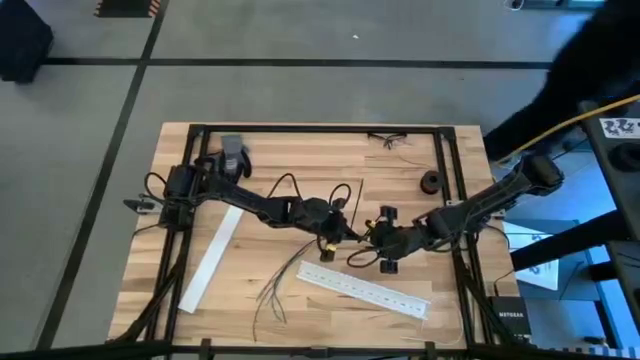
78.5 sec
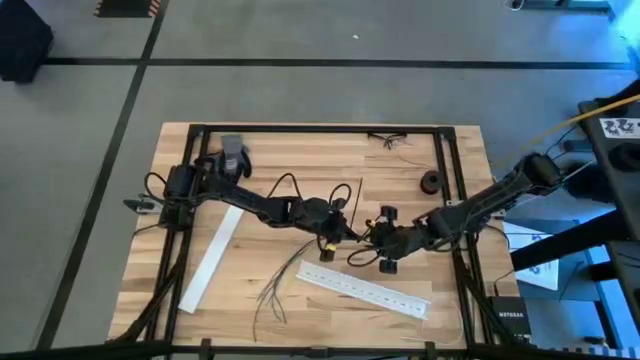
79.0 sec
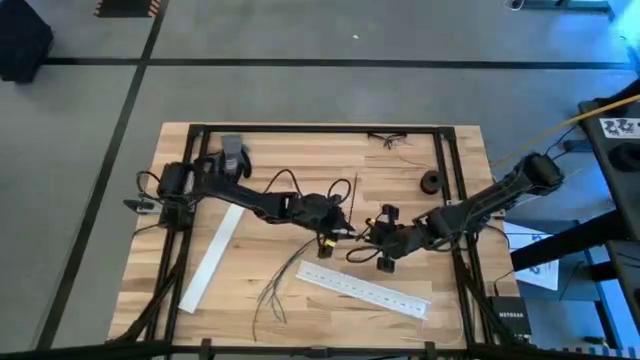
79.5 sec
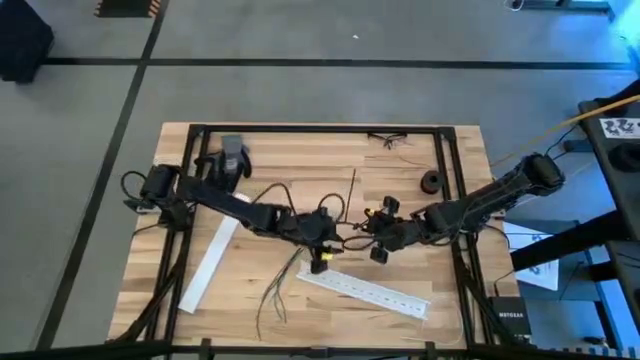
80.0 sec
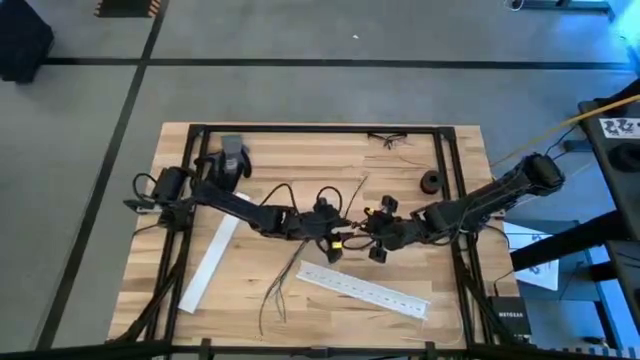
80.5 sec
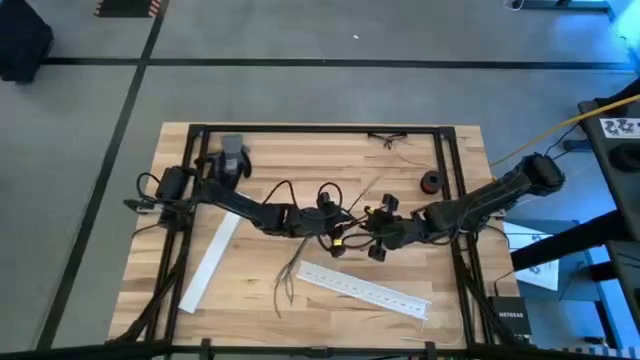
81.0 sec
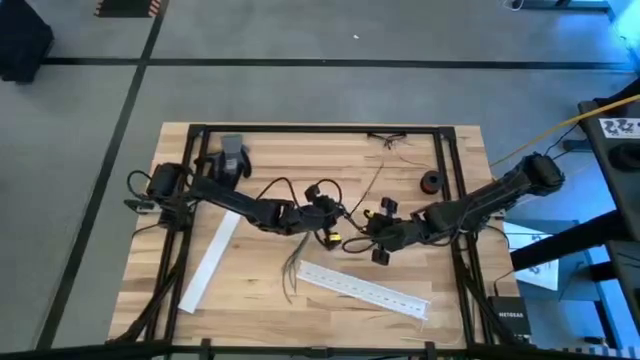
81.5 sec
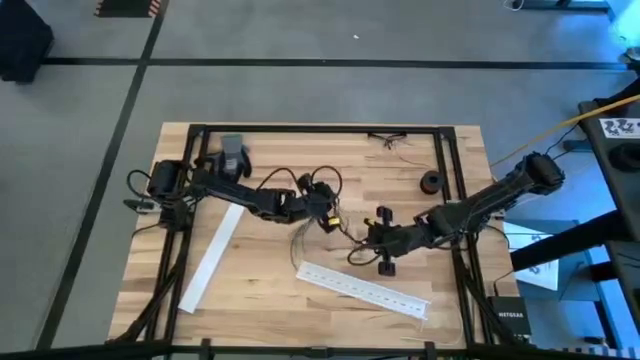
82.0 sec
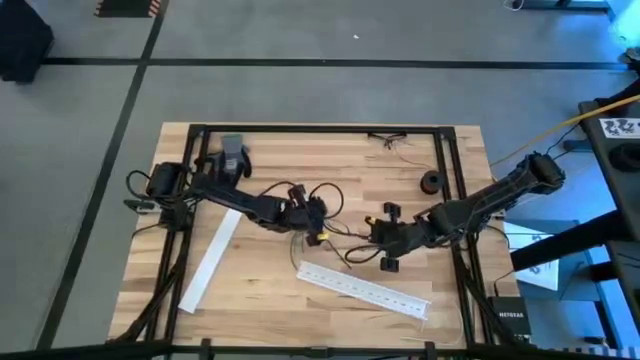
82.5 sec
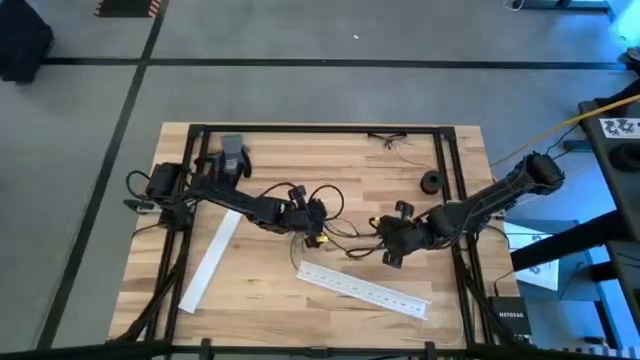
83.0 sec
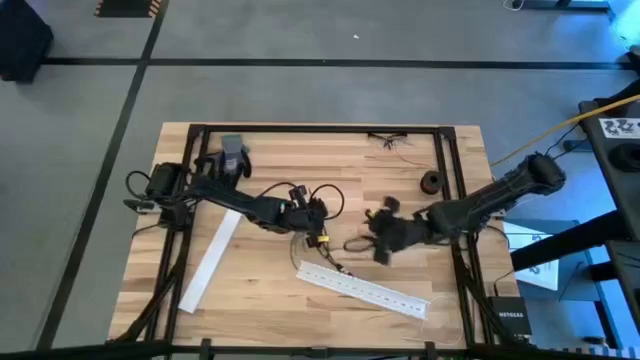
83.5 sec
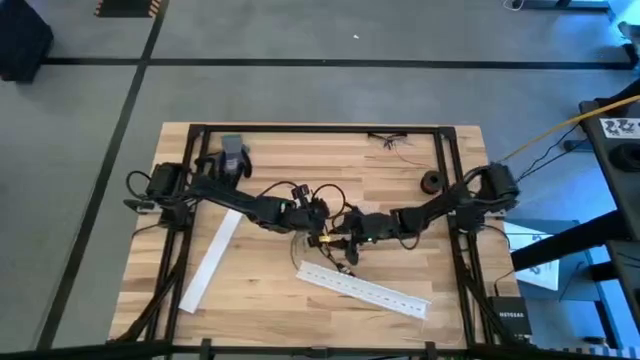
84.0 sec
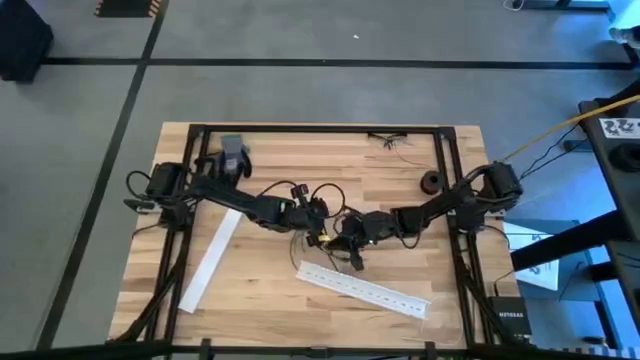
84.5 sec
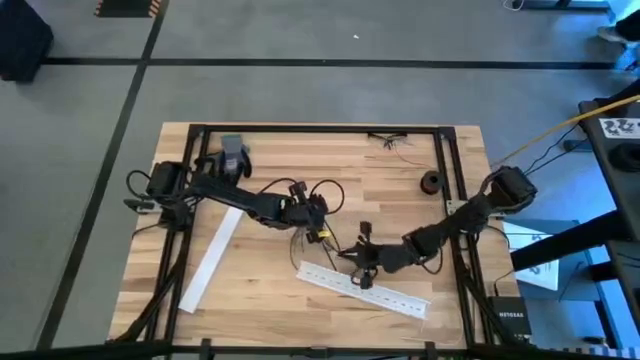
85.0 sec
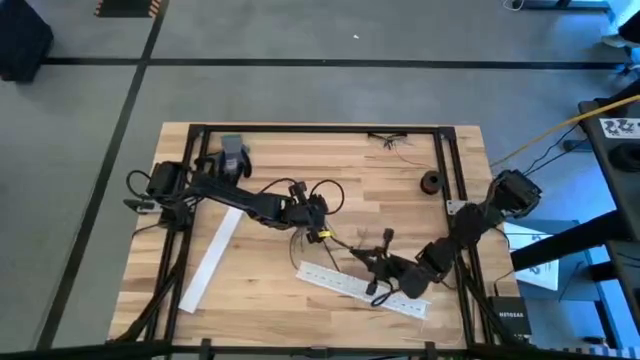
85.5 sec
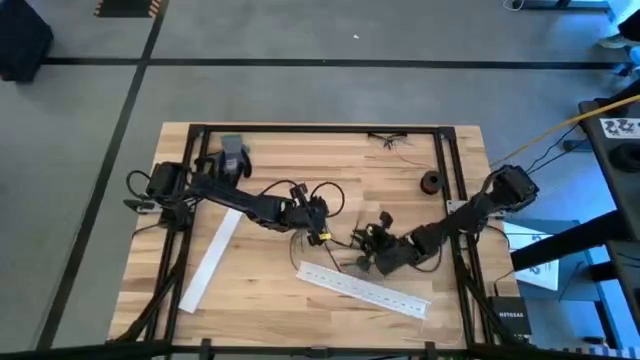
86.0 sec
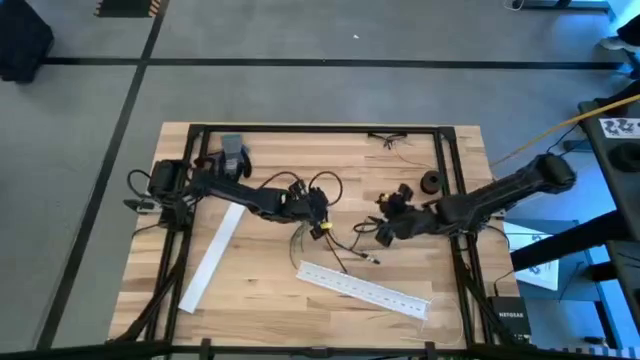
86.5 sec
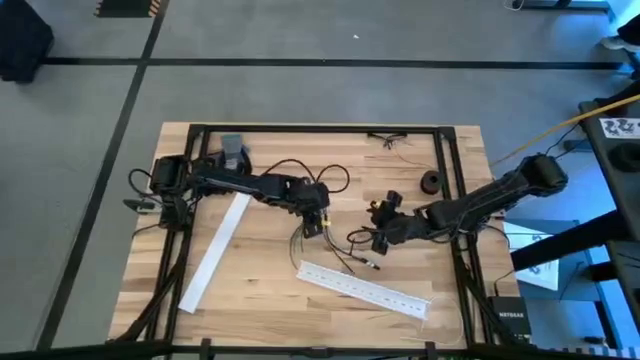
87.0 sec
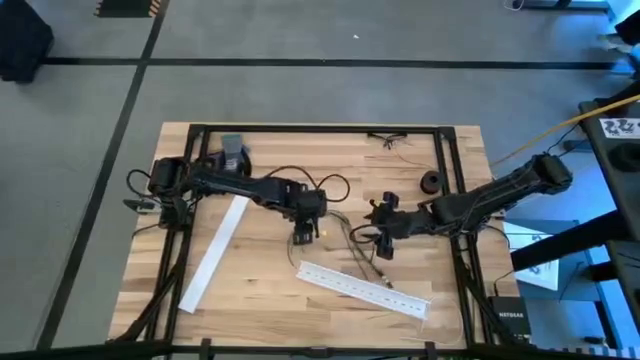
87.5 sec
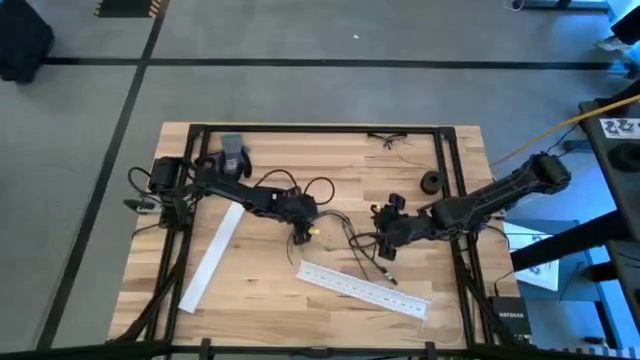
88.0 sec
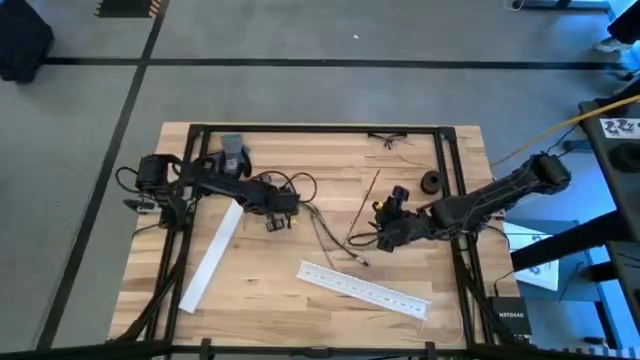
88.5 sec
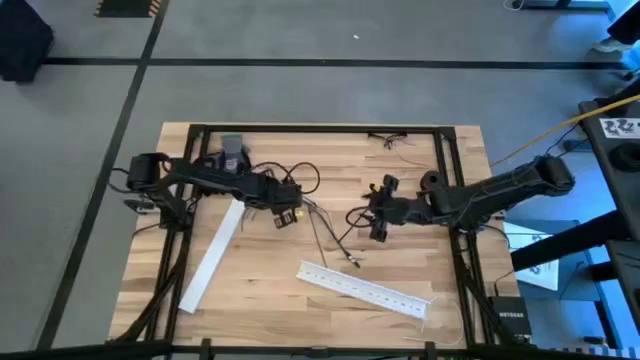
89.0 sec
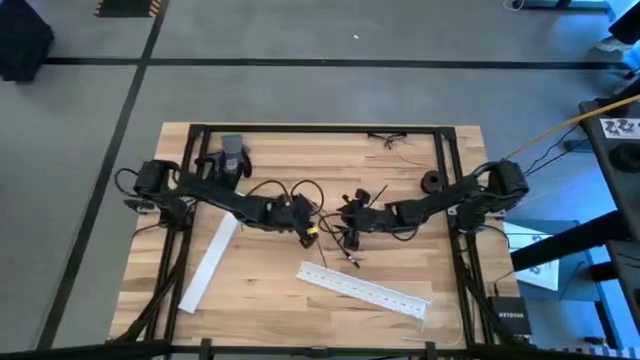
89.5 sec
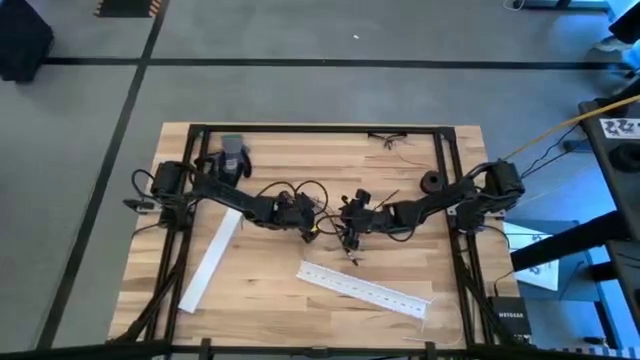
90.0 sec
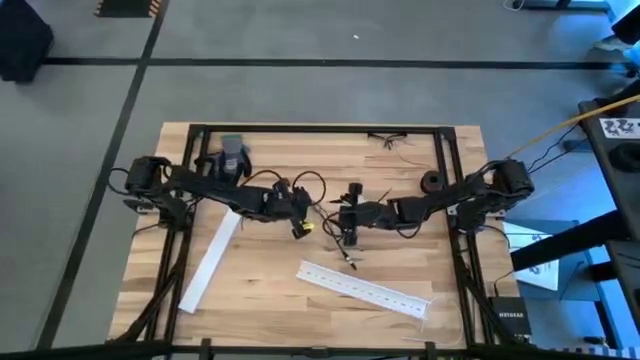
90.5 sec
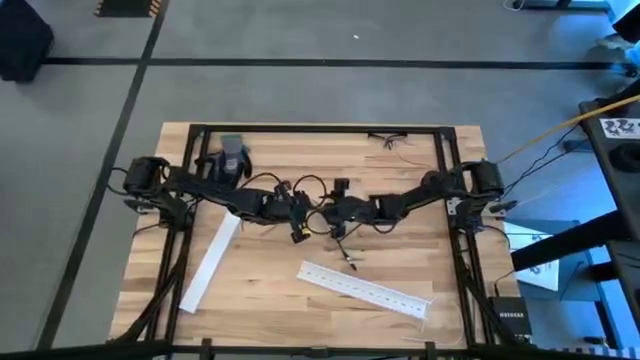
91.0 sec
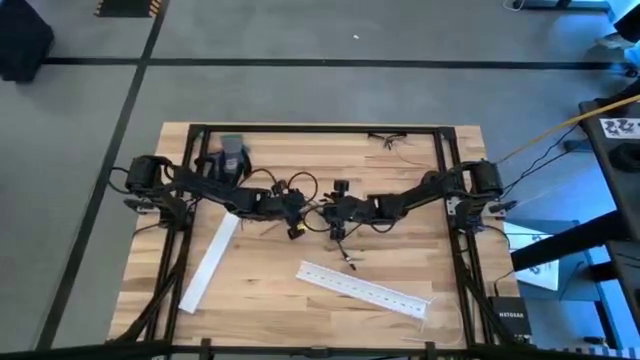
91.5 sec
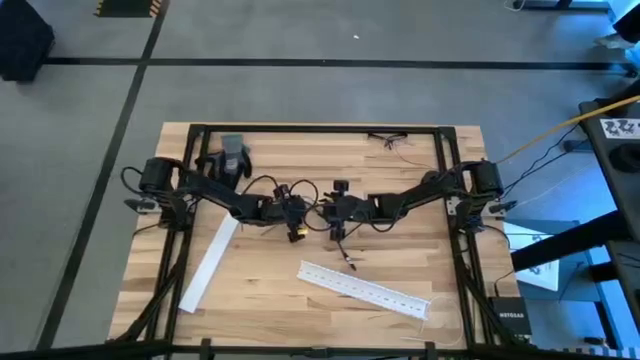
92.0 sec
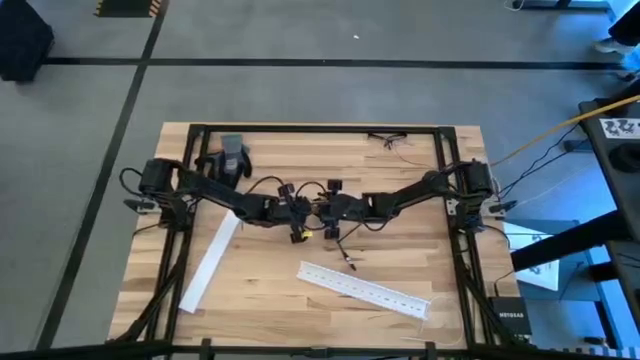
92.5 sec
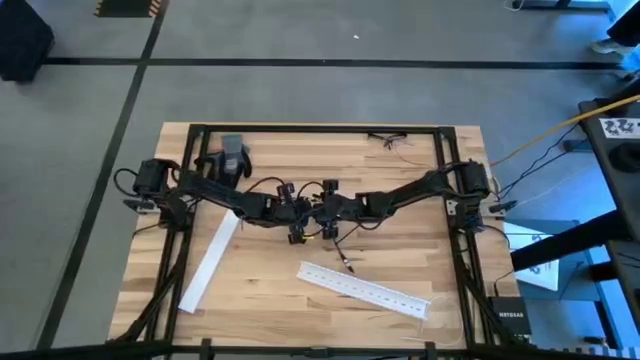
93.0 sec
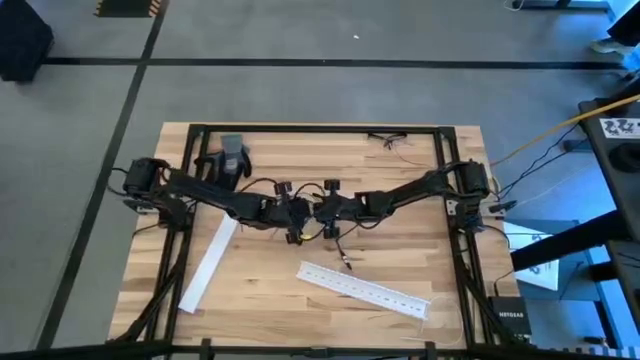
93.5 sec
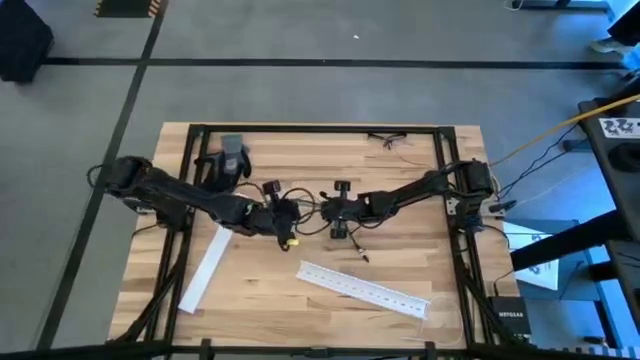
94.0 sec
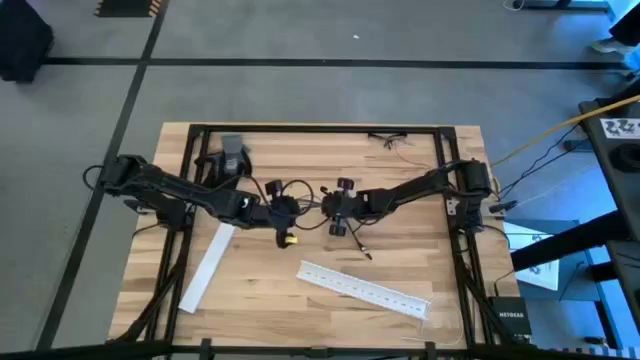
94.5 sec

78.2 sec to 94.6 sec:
Task: Ziptie cables
Wrap the cables together using the top zip tie

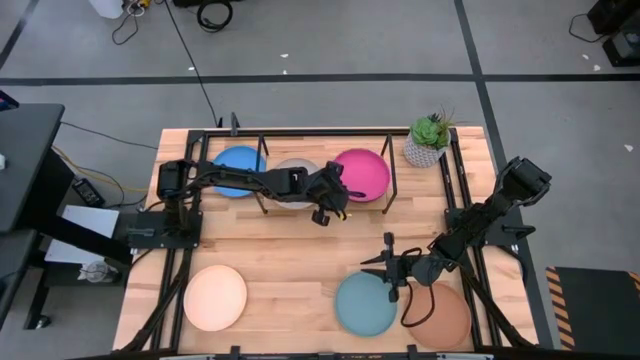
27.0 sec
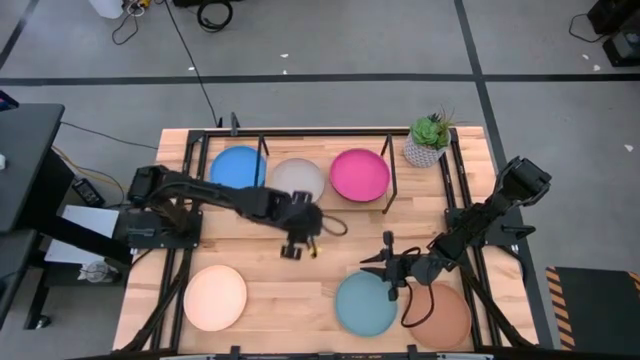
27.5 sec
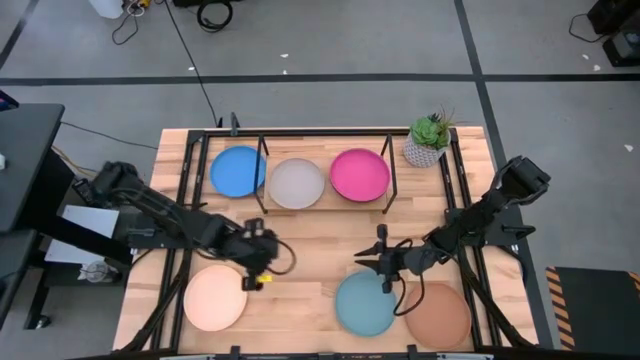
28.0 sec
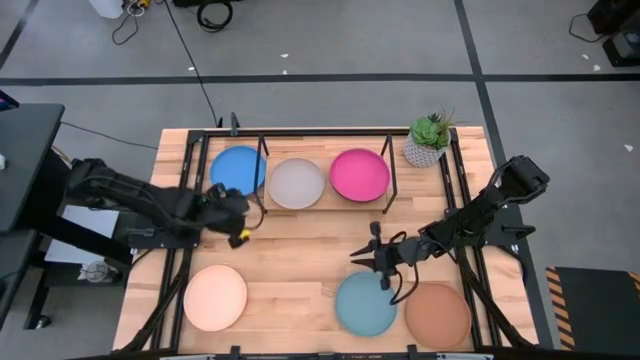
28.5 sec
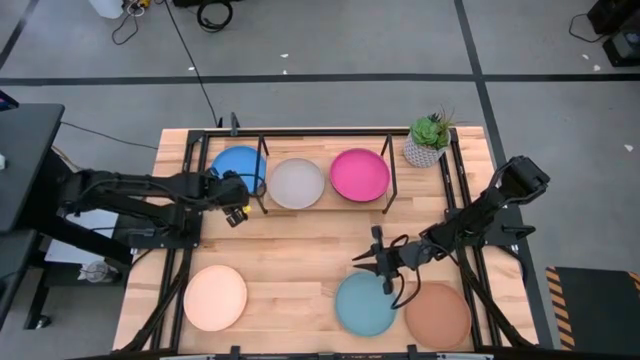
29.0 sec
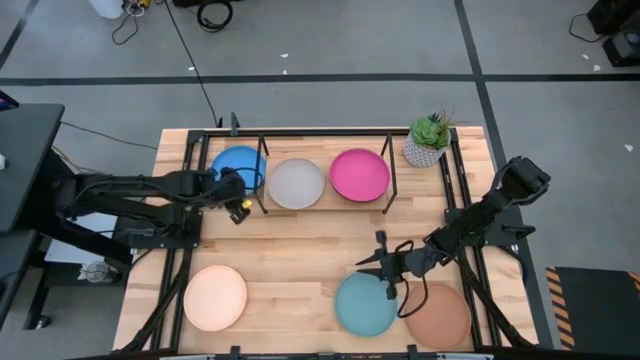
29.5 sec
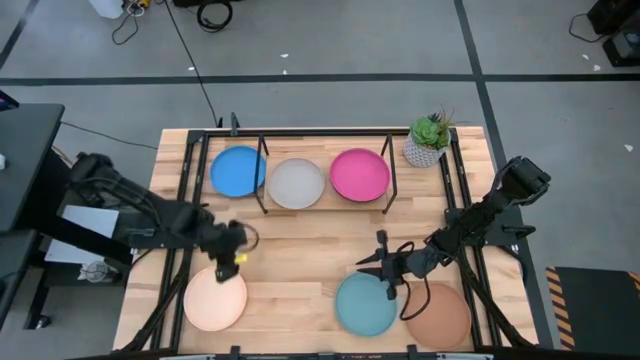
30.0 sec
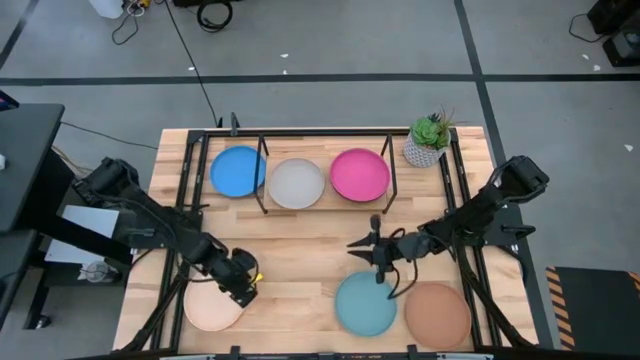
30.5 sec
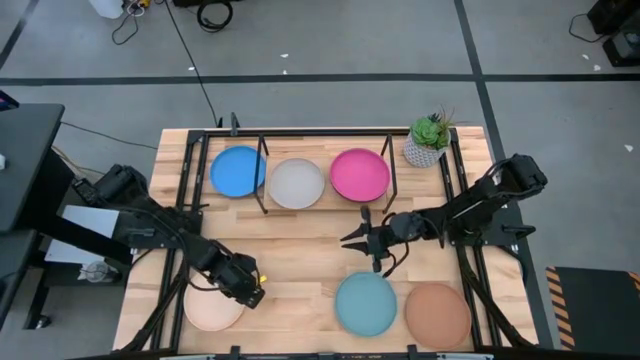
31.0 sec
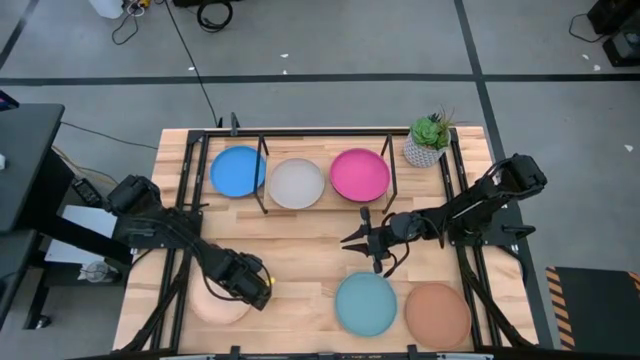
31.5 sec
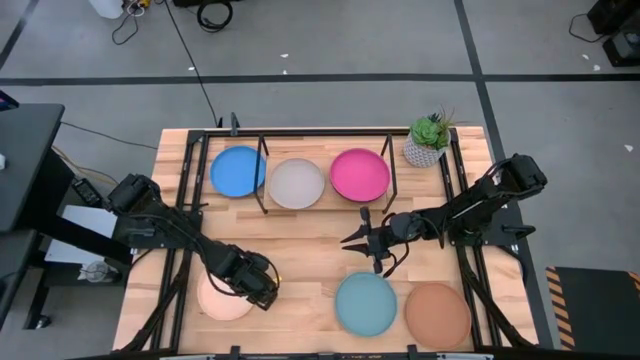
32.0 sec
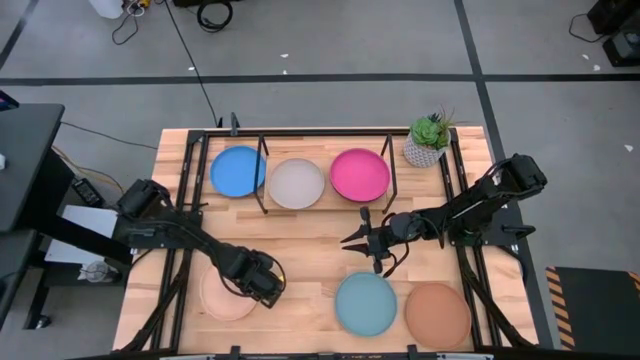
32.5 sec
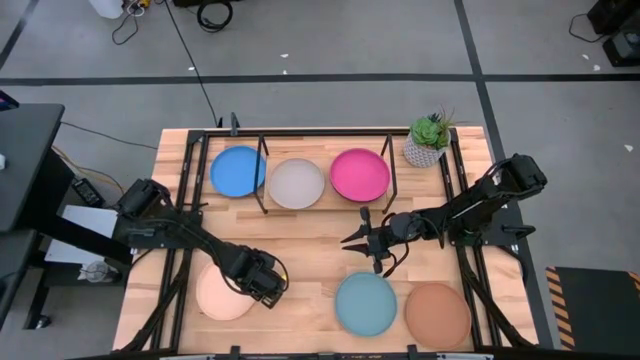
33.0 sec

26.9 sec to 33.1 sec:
Task: Place and stack plates onto a shelf
Stack the light orange plate on top of the gray plate on the shelf
